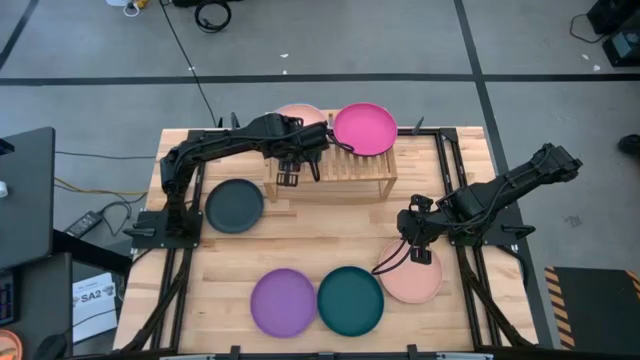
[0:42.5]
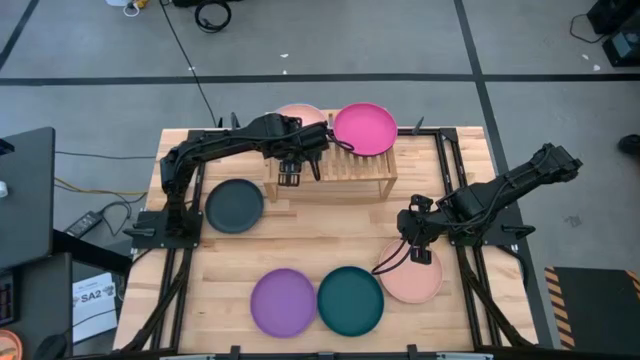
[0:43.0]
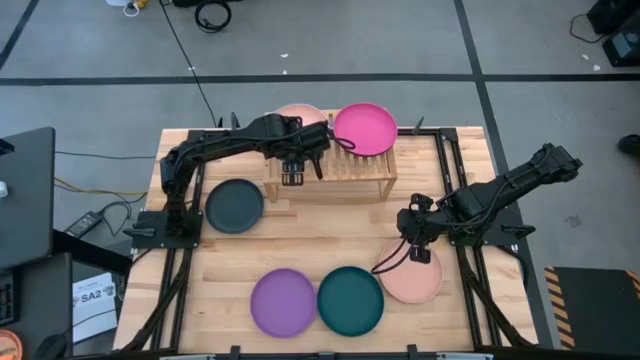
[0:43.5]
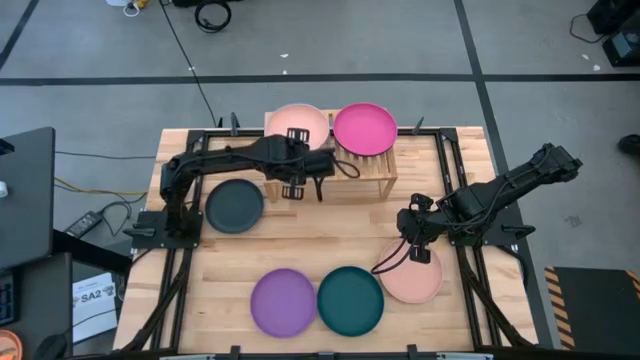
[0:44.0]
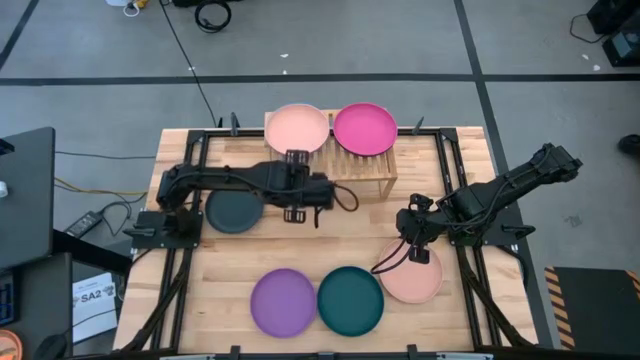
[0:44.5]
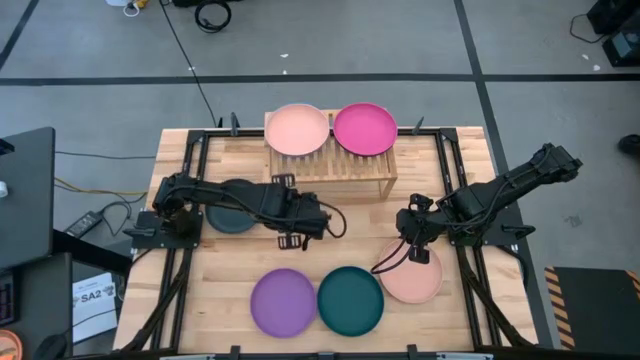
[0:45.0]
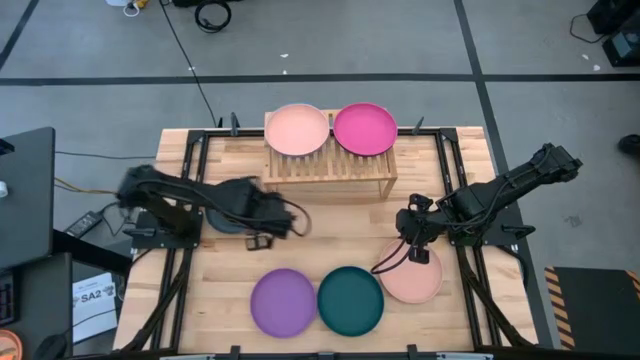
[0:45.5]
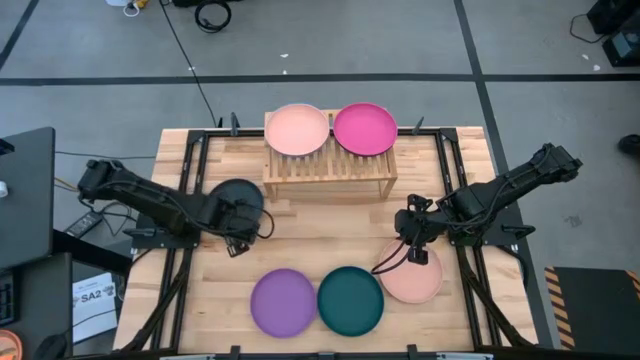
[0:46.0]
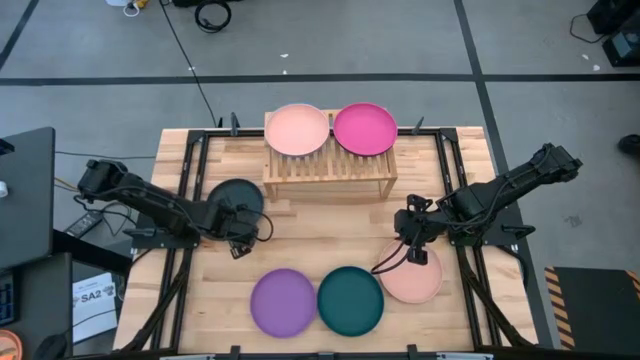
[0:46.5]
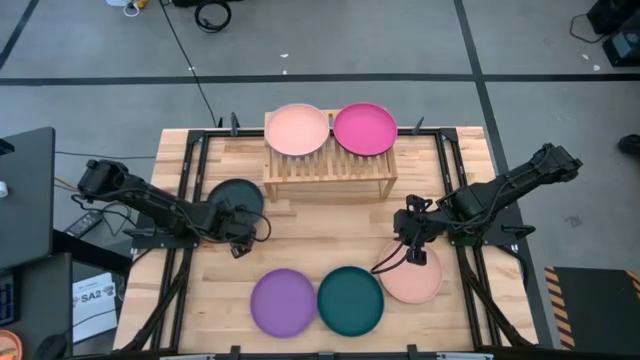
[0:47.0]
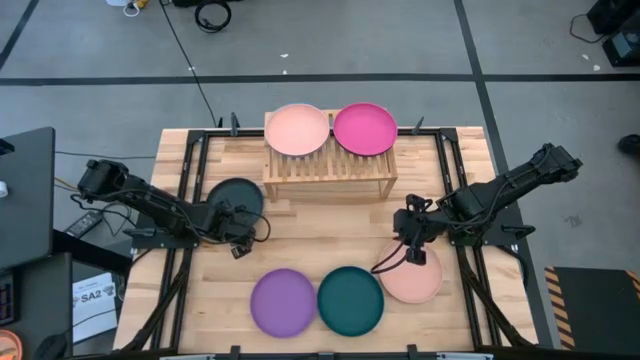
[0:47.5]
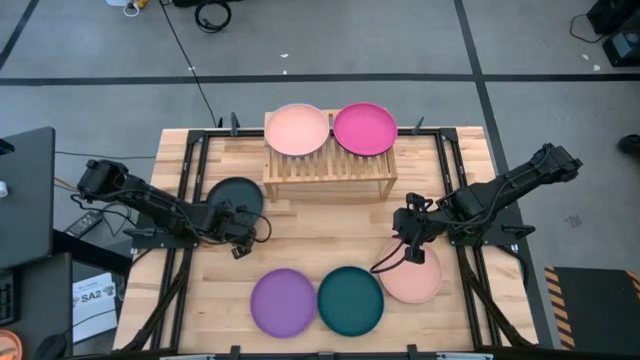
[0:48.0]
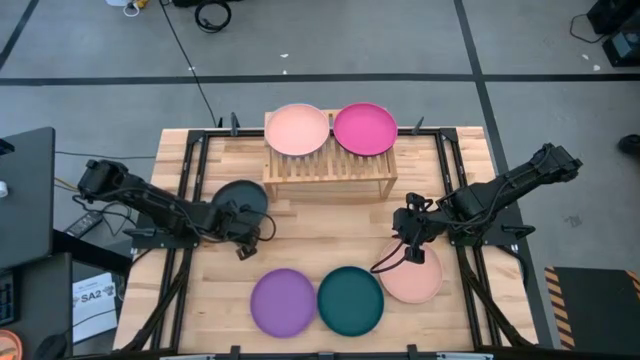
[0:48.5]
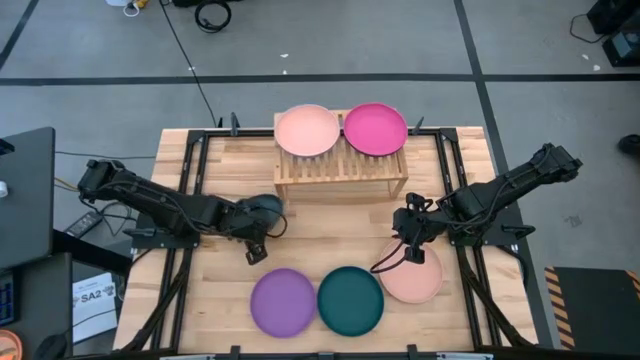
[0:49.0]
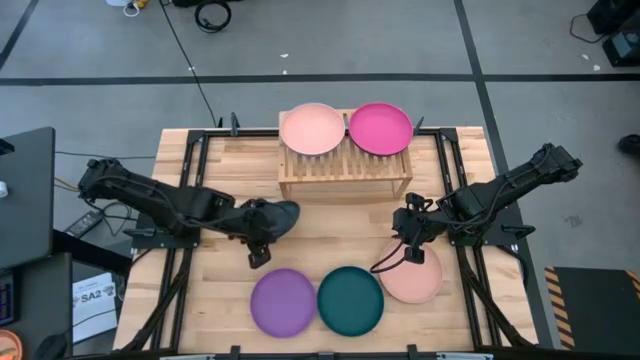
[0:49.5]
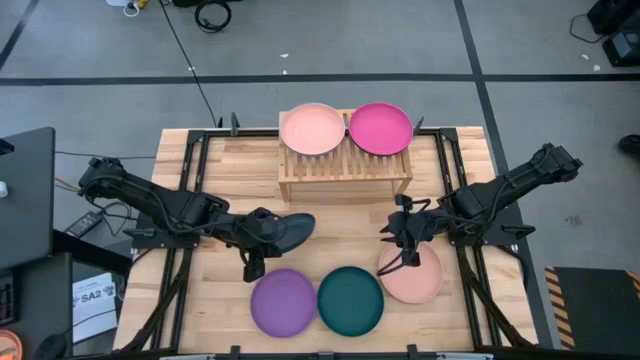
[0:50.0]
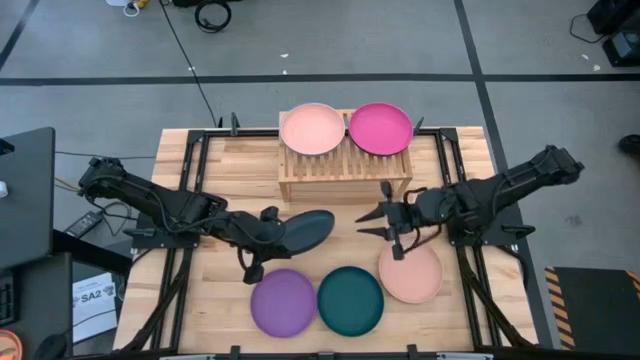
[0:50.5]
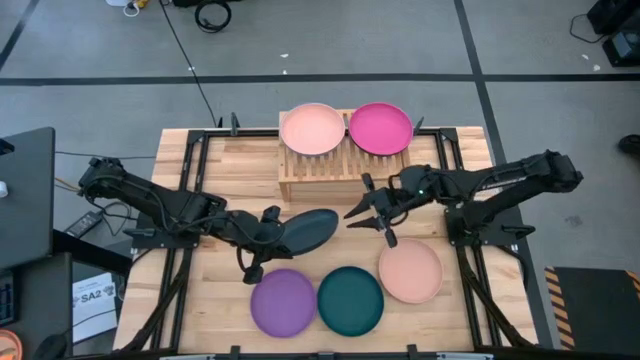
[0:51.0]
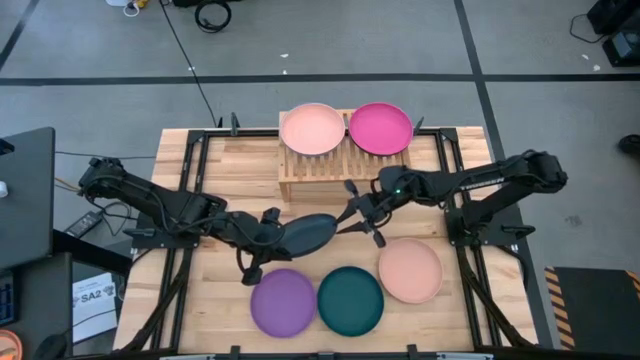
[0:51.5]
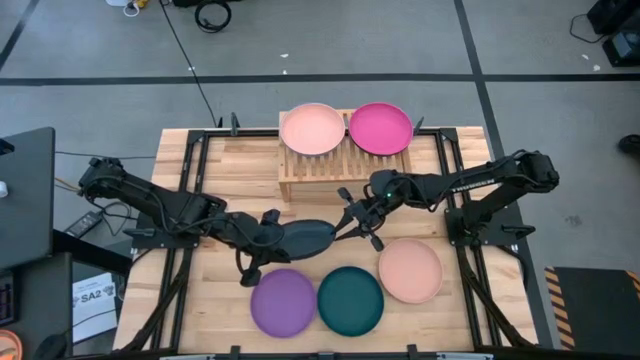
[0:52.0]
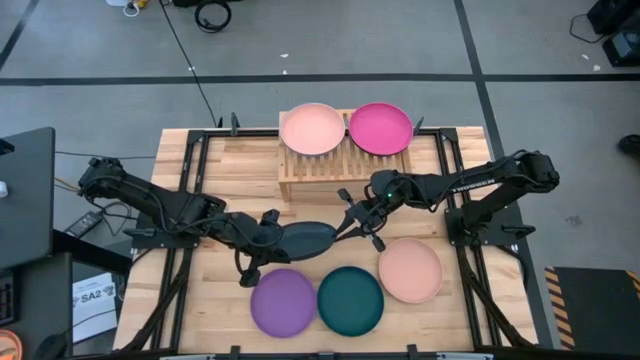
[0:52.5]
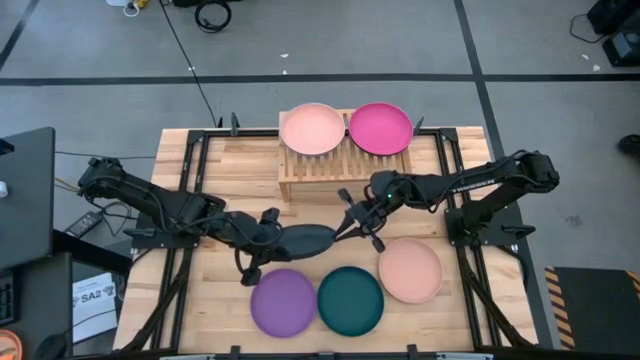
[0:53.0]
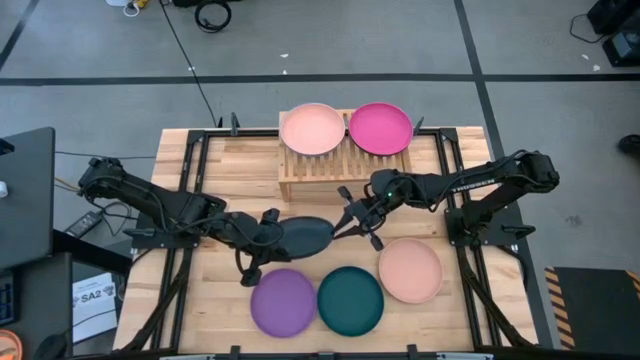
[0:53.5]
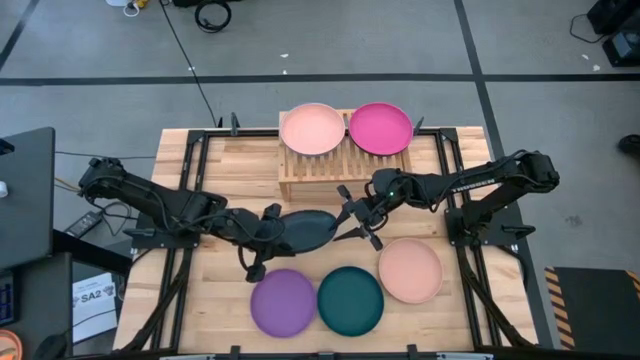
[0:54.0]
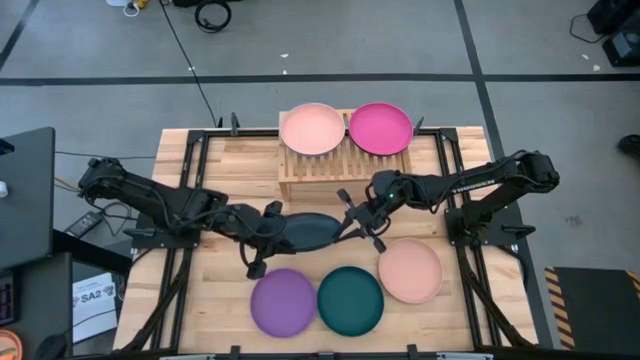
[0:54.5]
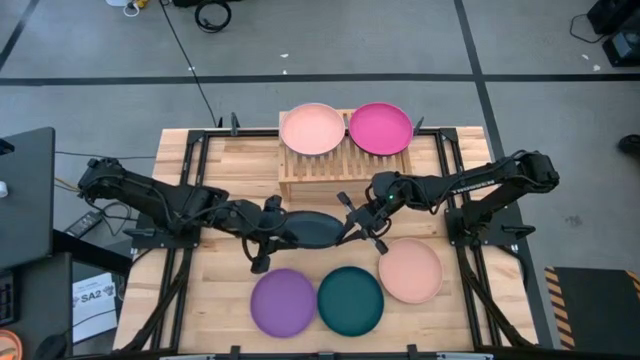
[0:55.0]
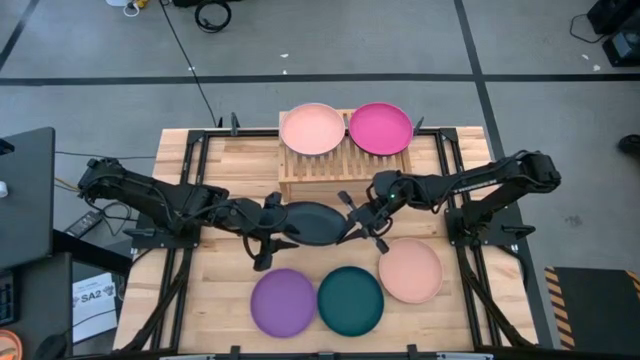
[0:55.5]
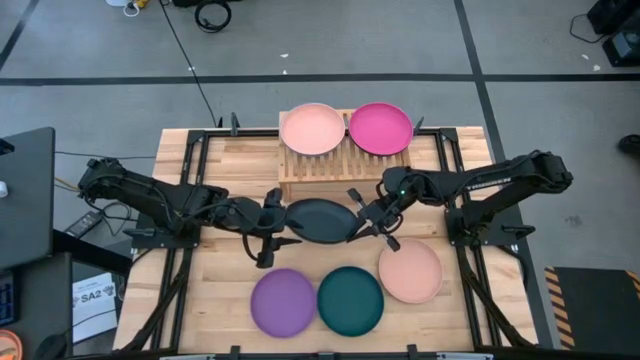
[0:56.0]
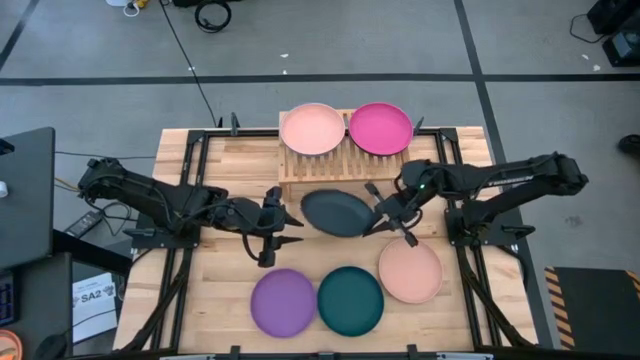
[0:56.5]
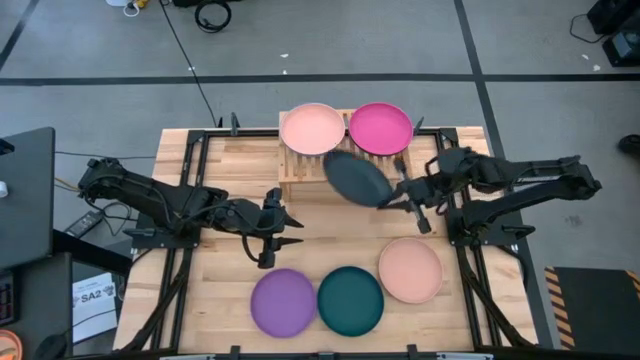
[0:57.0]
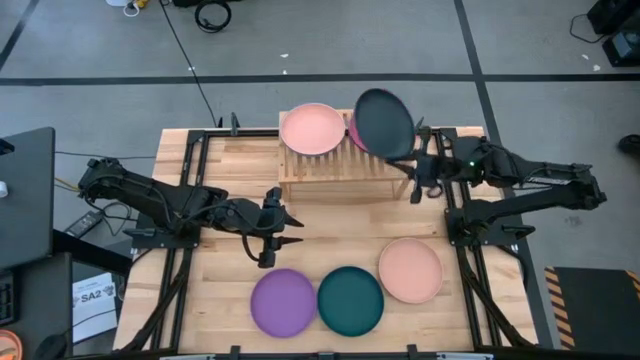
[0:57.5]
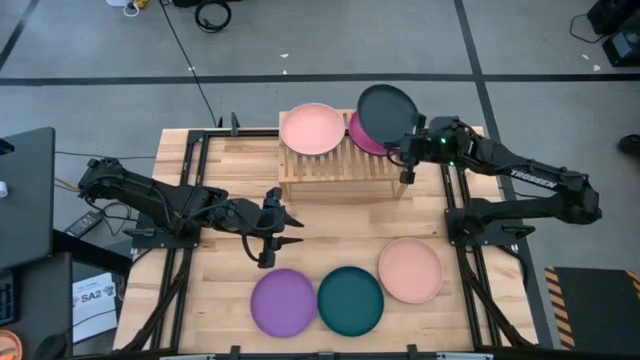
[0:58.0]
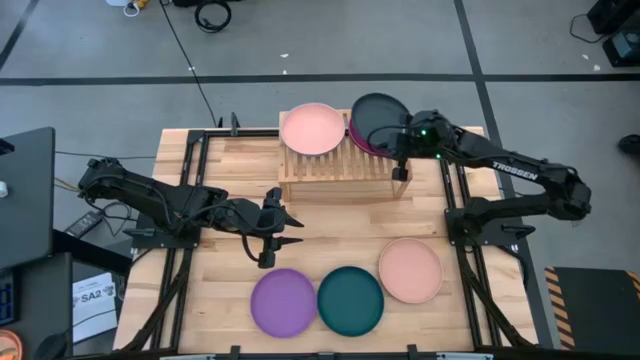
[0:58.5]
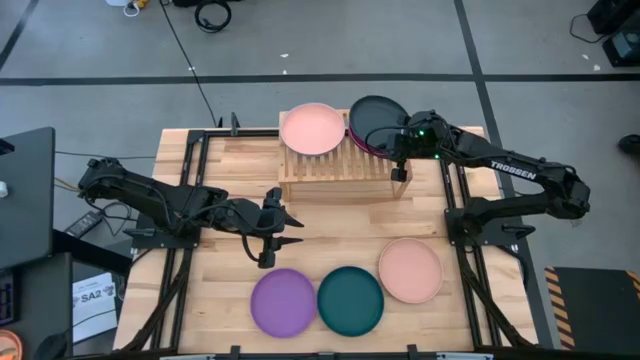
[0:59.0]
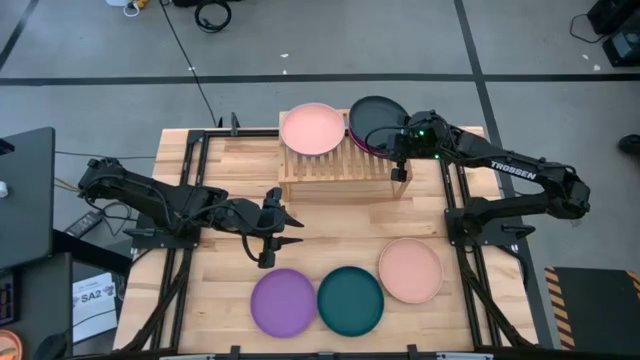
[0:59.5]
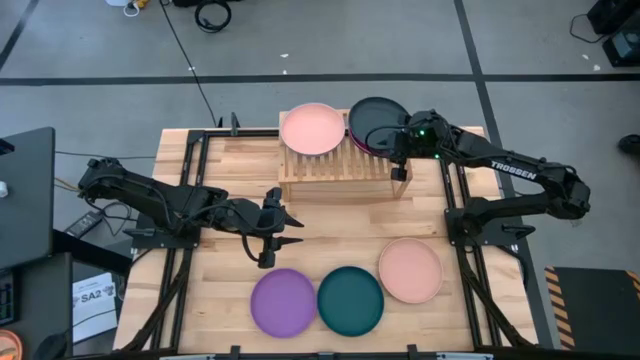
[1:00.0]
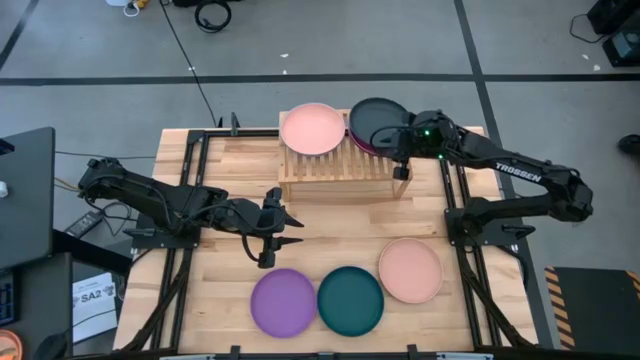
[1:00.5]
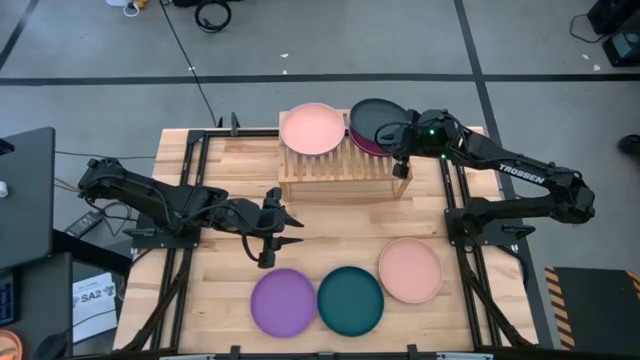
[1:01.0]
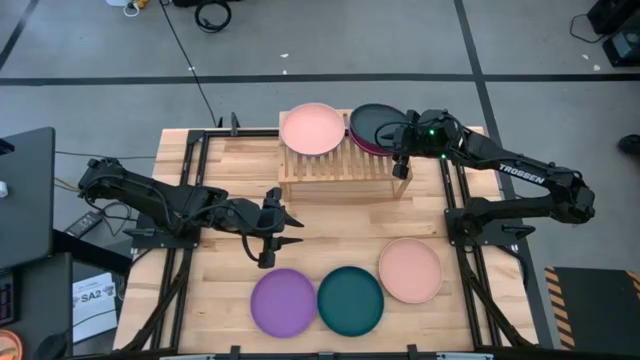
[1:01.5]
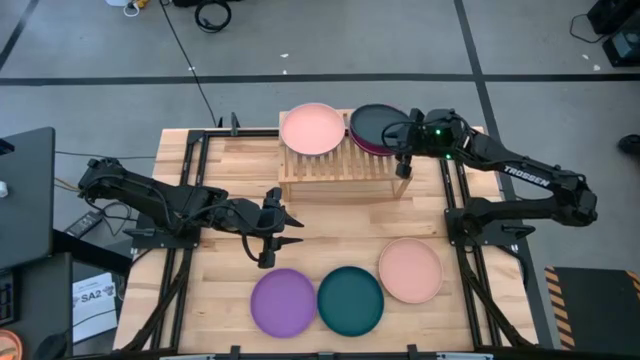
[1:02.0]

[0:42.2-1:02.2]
Task: Place and stack plates onto a shelf
Stack the black plate on the pink plate on the shelf
